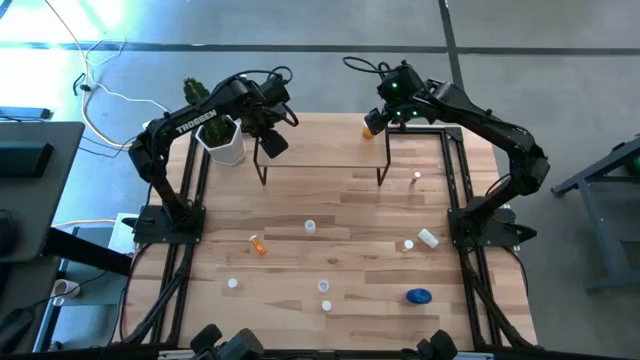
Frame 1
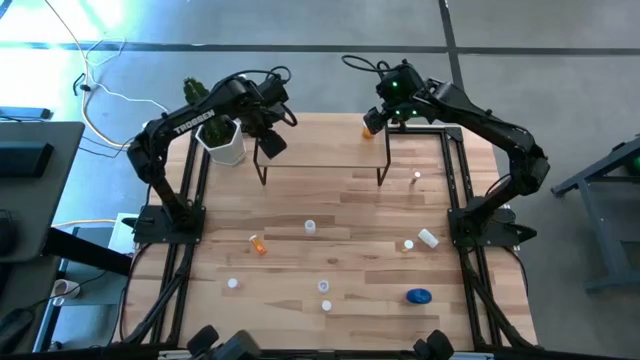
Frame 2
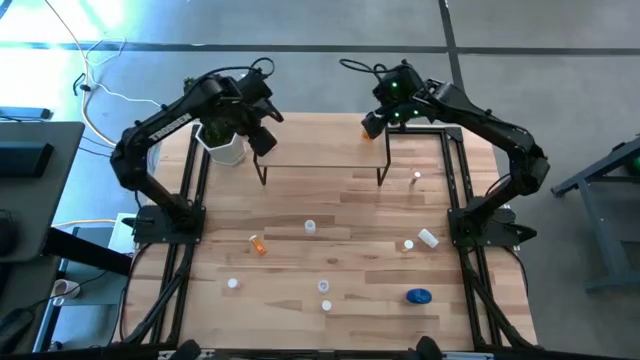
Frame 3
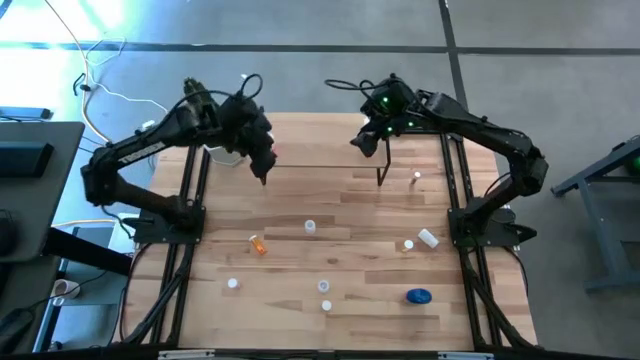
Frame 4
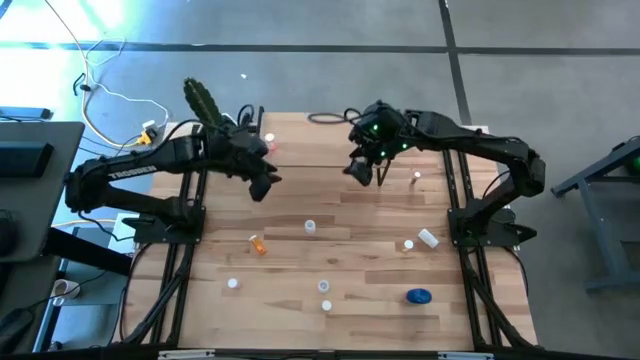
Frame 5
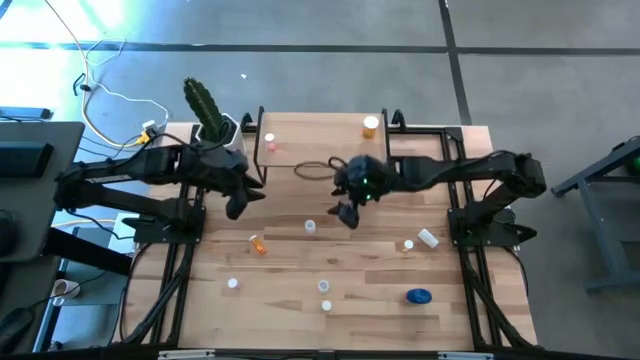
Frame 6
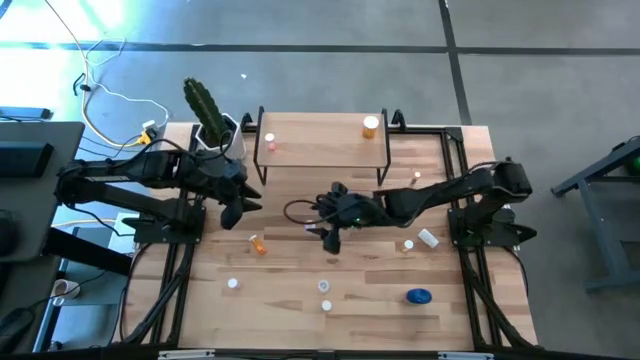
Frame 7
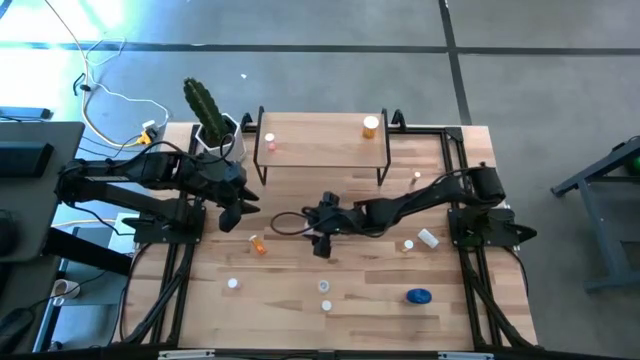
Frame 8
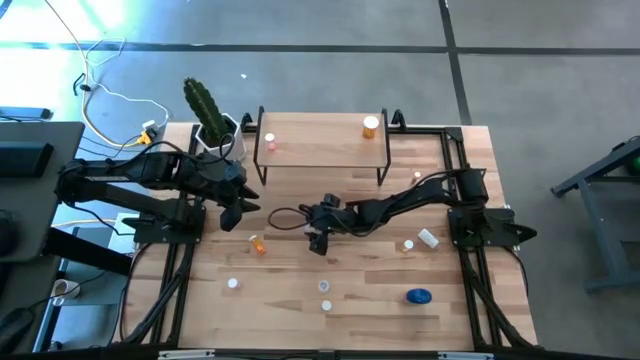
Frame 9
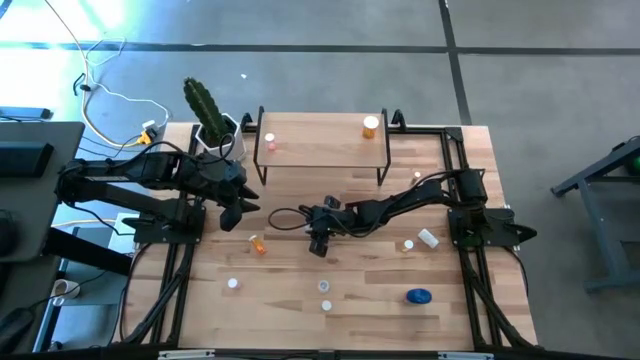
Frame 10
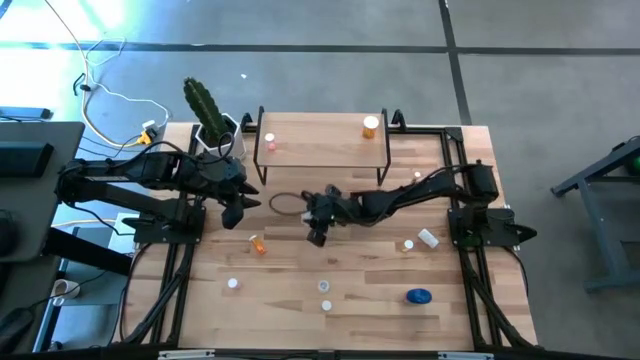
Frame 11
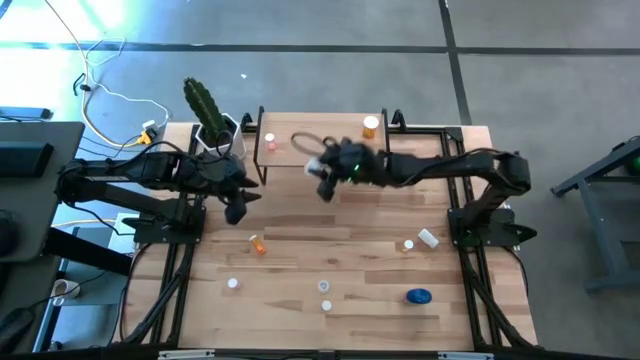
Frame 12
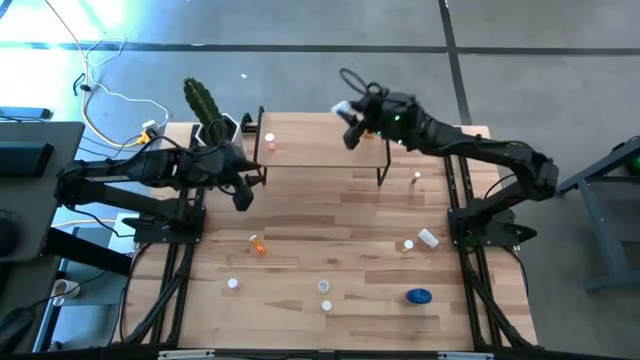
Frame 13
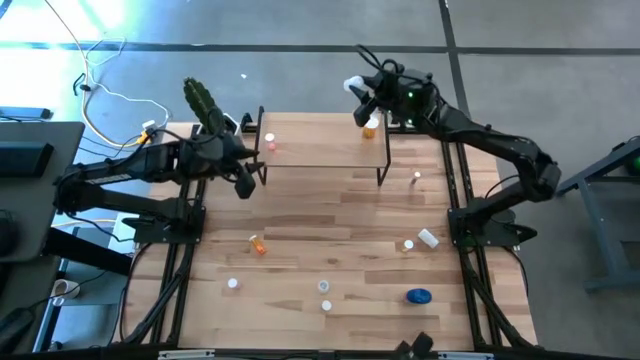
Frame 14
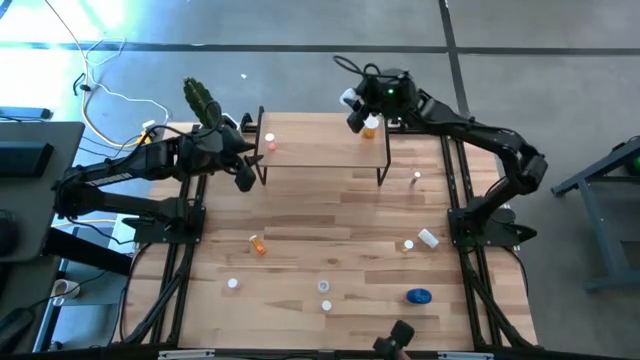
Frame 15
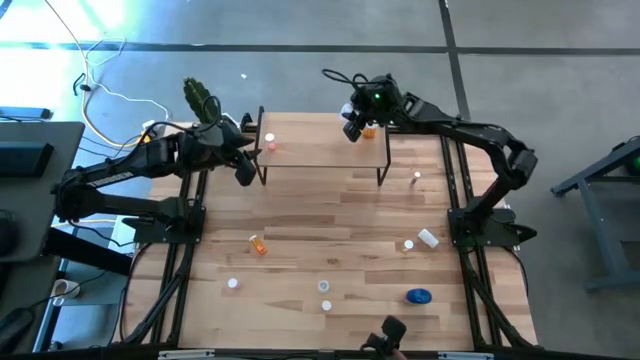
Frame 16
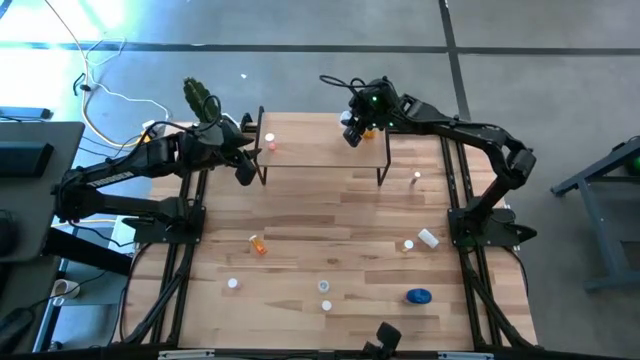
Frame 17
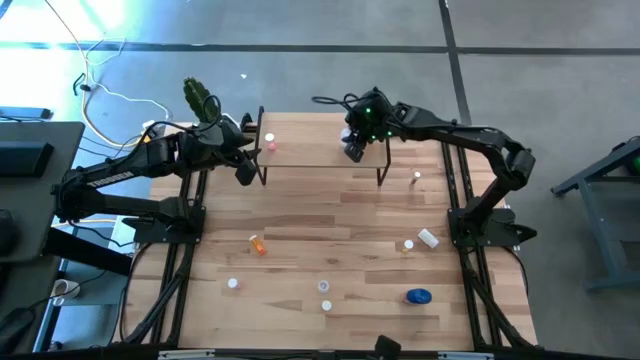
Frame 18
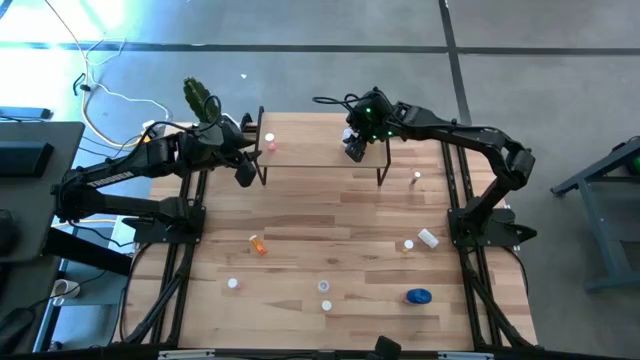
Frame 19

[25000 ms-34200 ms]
Task: Pick and place medicine bottles onto shelf by color
Put the bottom left white pill bottle on the shelf

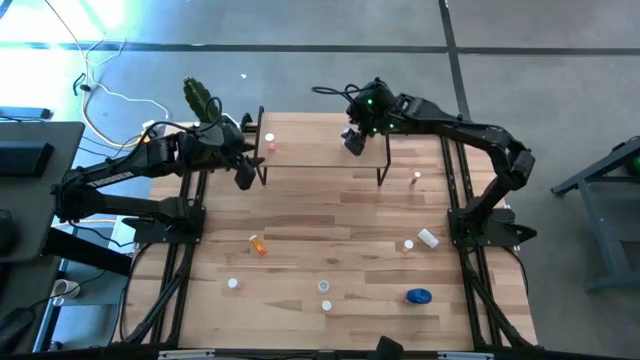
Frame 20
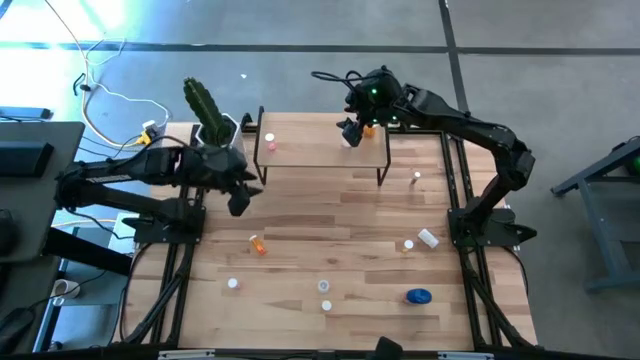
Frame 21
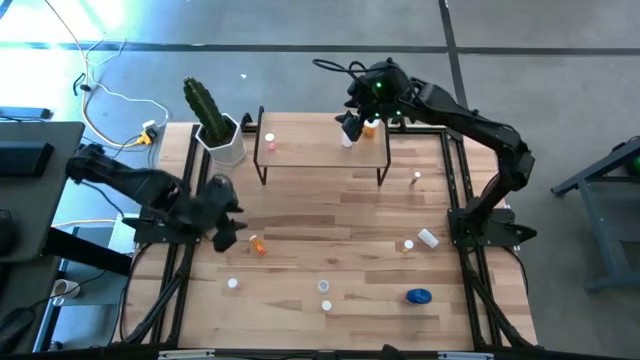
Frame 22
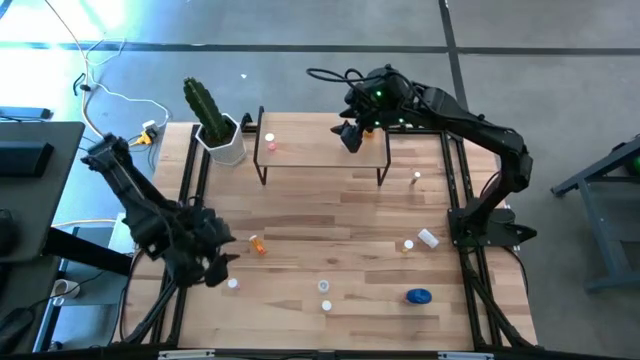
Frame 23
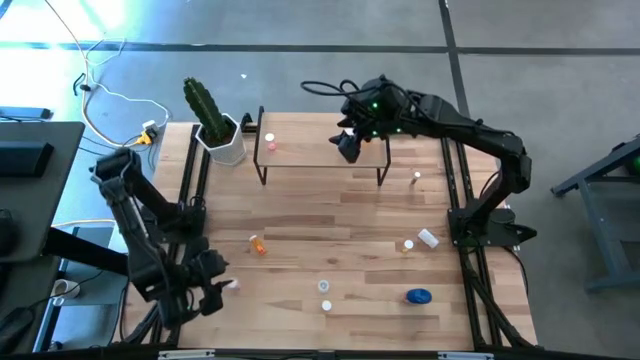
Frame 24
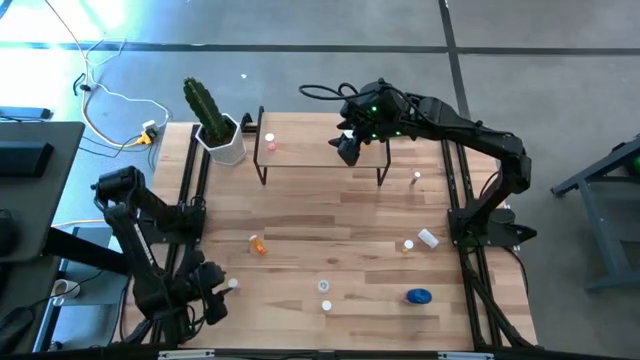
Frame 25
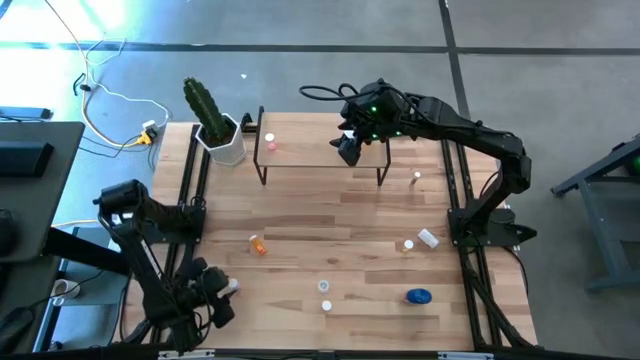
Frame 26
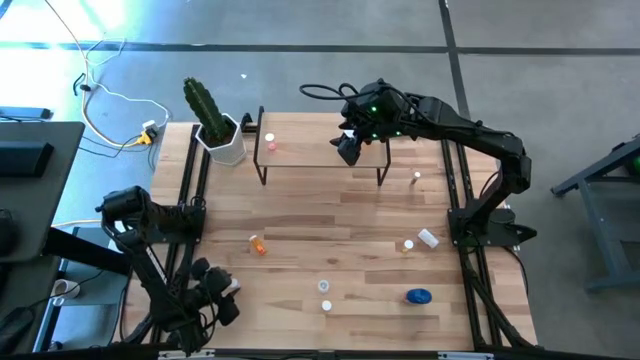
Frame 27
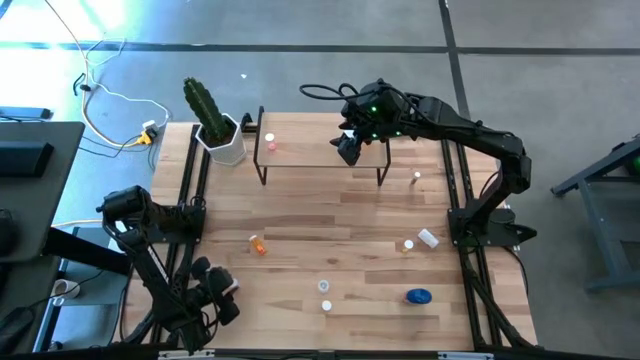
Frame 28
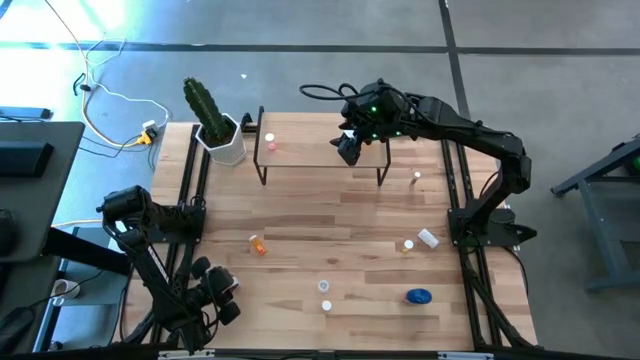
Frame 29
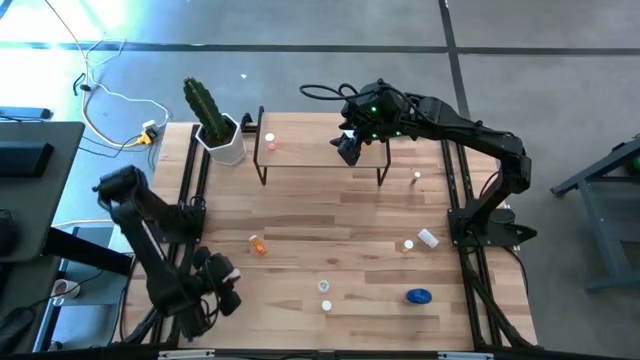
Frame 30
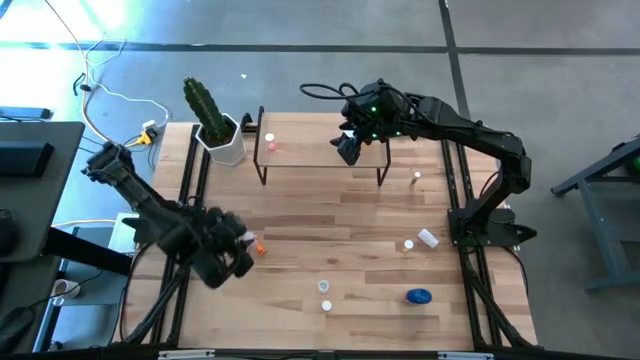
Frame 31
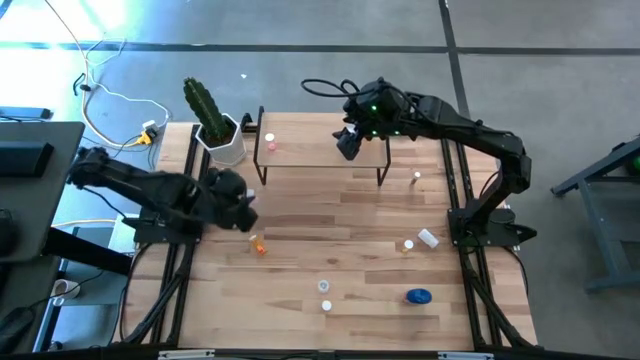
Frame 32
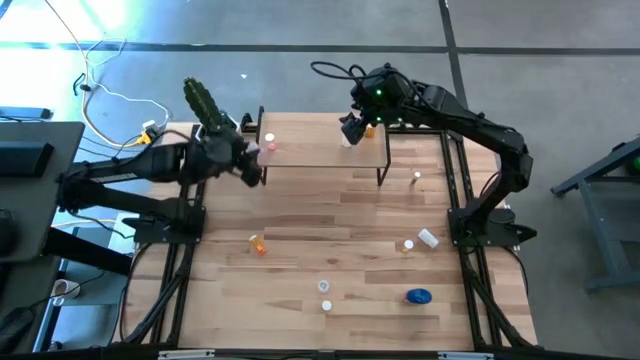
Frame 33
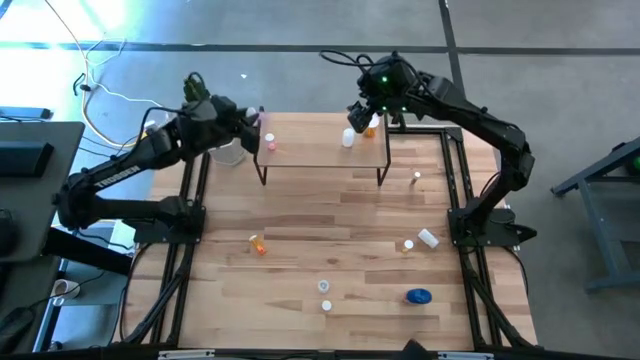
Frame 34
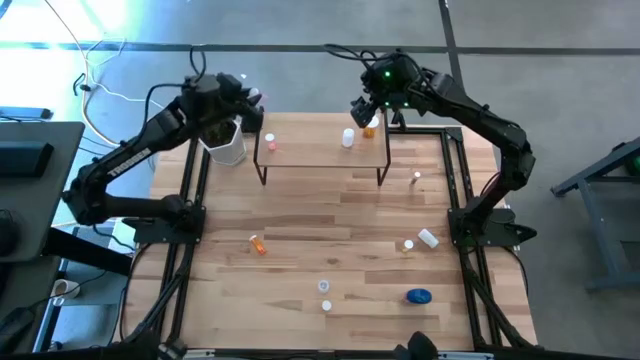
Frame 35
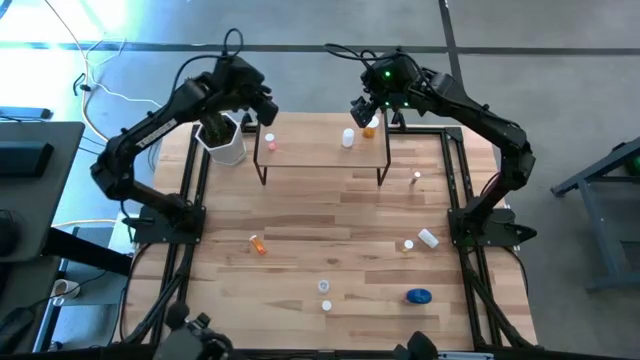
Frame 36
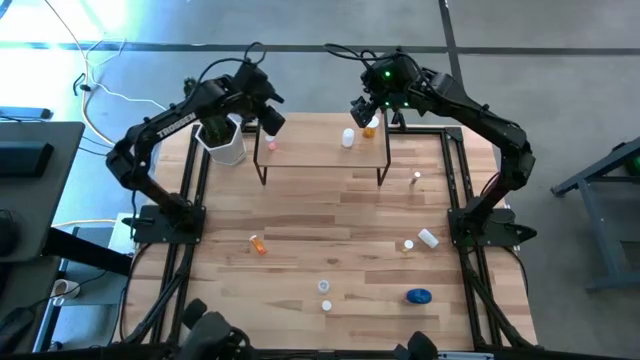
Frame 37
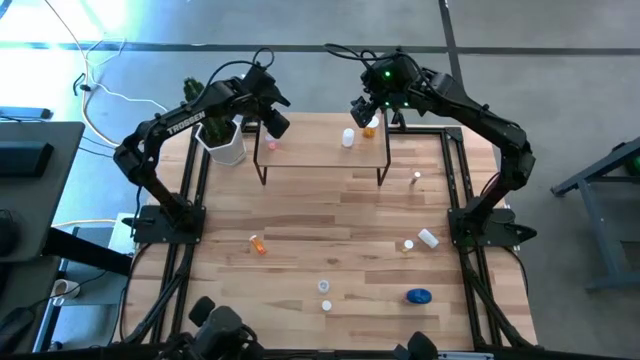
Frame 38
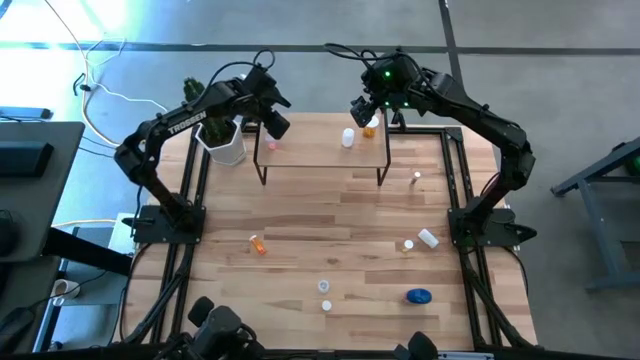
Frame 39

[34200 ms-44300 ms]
Put the pink pill bottle on the shelf

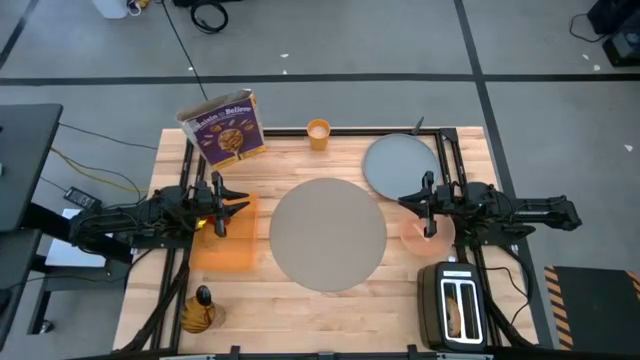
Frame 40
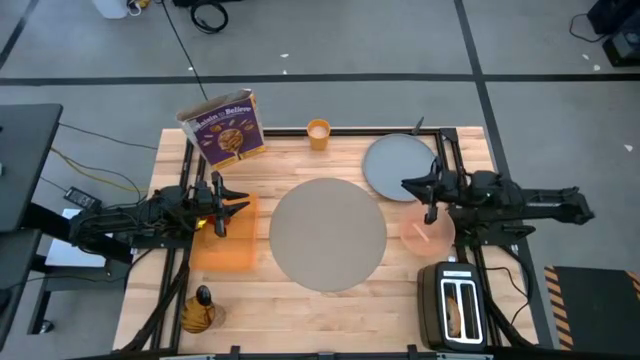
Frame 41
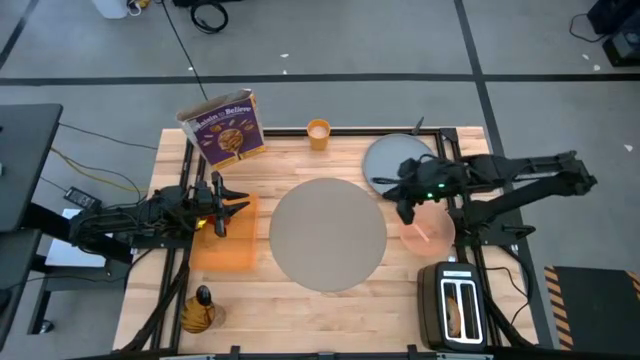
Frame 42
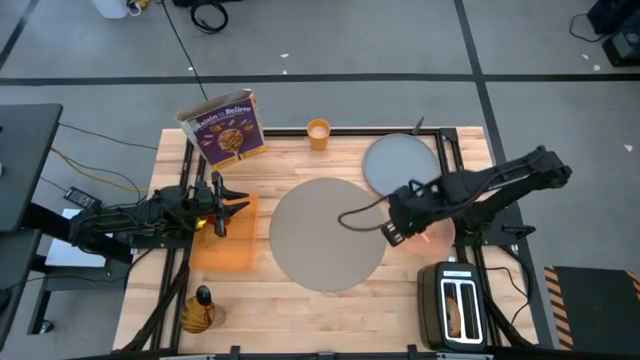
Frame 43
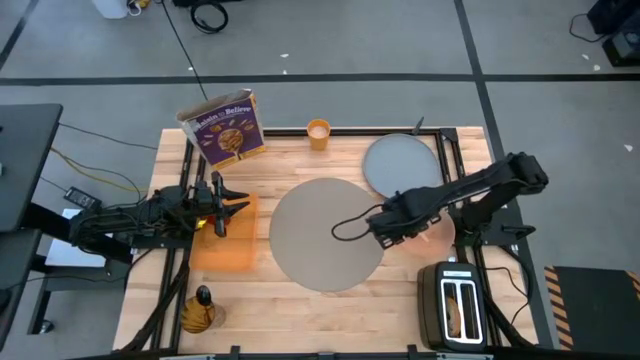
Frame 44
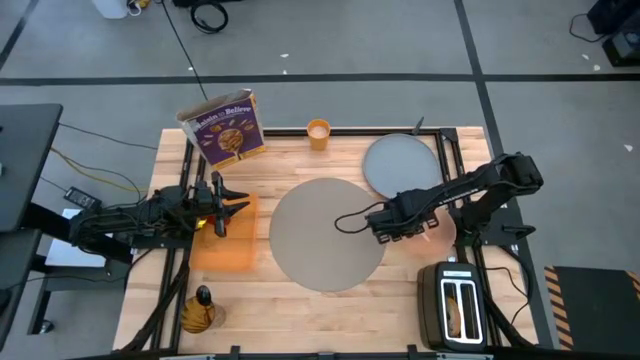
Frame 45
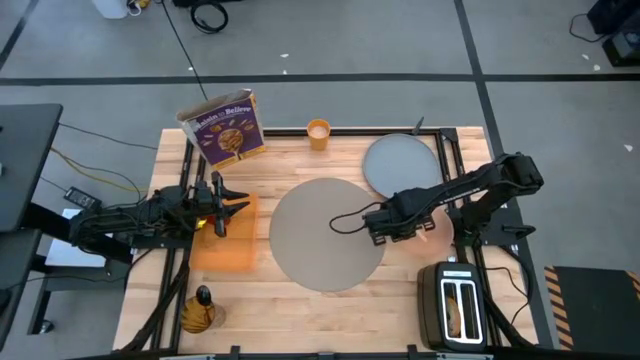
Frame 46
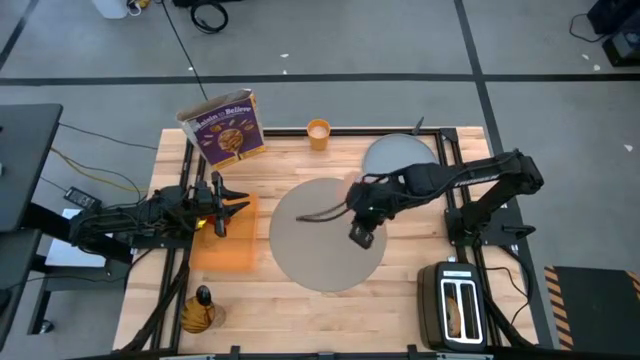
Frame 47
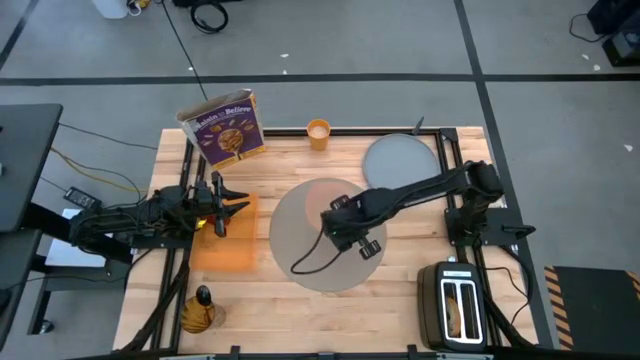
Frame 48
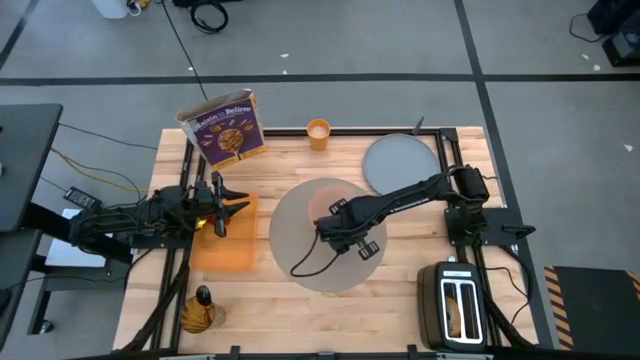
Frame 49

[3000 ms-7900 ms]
Task: Arrange a breakfast setting
Put the pink bowl on the gray placemat
